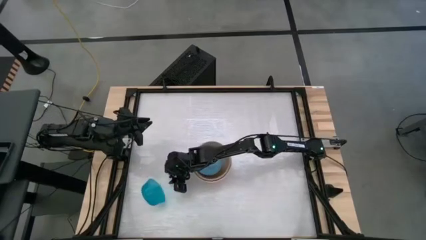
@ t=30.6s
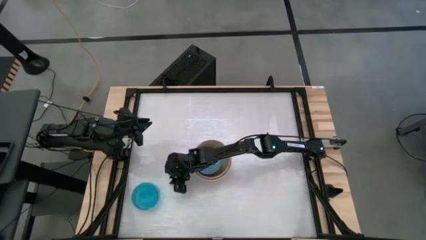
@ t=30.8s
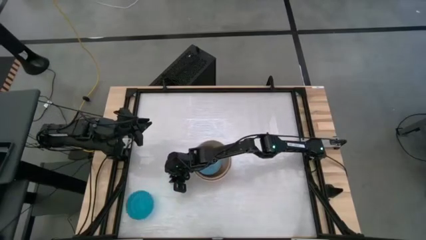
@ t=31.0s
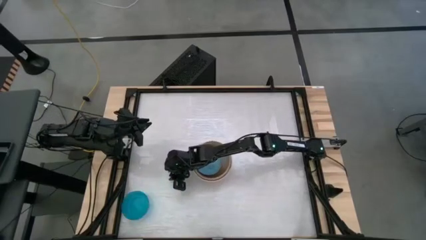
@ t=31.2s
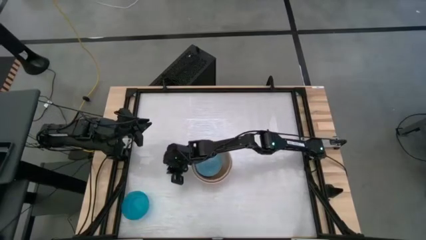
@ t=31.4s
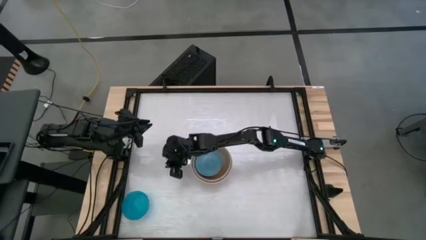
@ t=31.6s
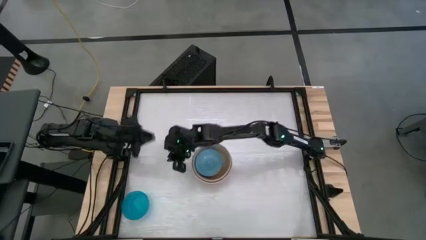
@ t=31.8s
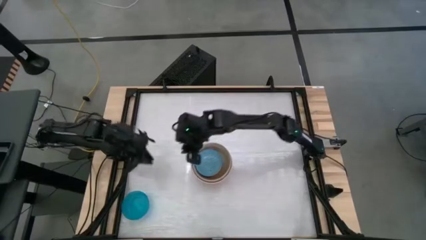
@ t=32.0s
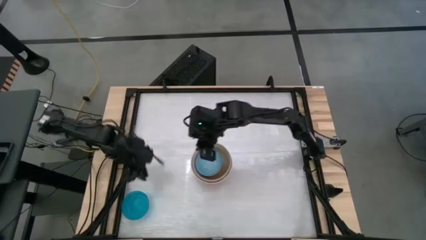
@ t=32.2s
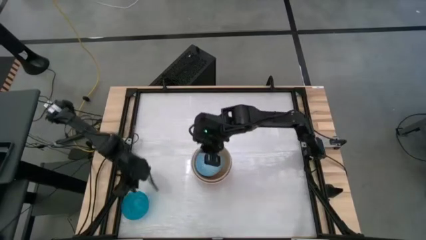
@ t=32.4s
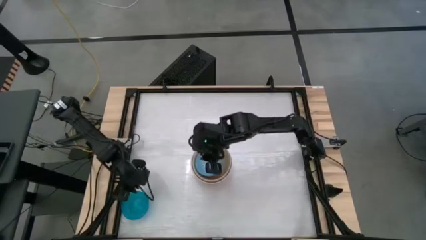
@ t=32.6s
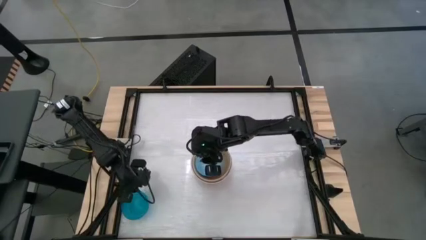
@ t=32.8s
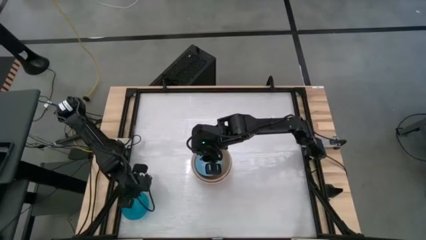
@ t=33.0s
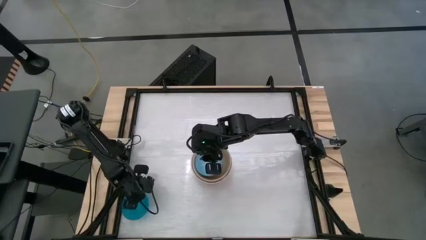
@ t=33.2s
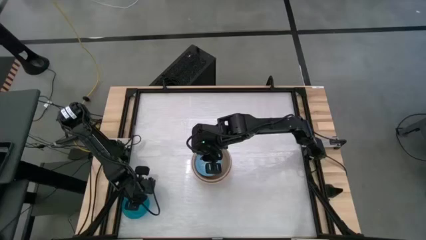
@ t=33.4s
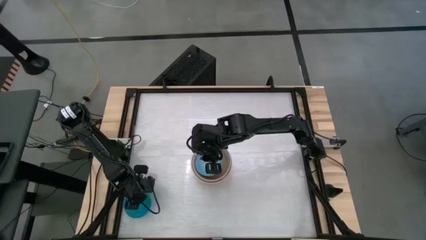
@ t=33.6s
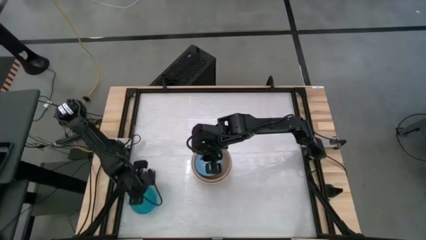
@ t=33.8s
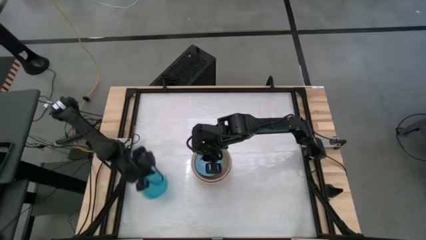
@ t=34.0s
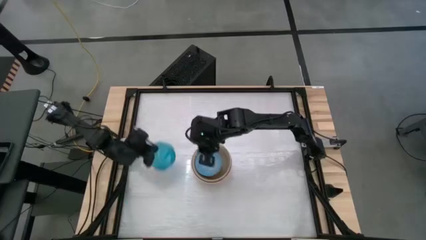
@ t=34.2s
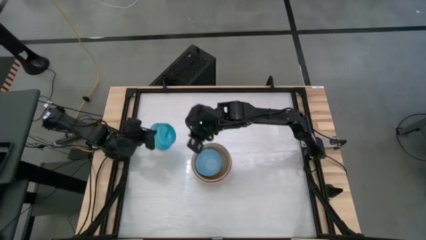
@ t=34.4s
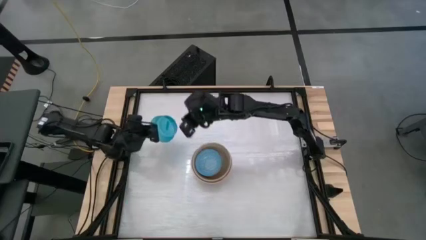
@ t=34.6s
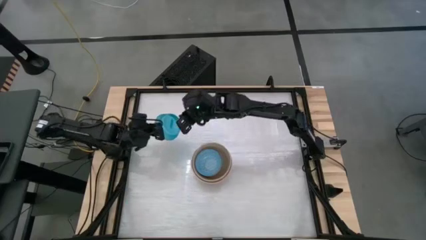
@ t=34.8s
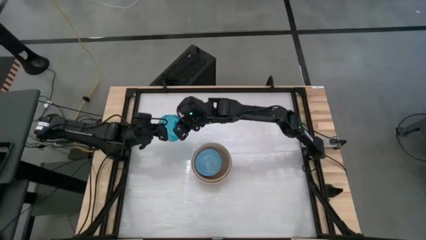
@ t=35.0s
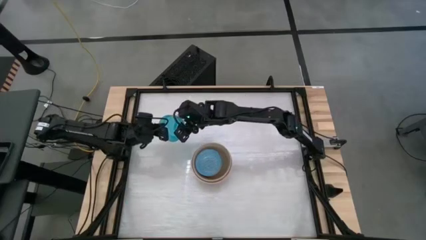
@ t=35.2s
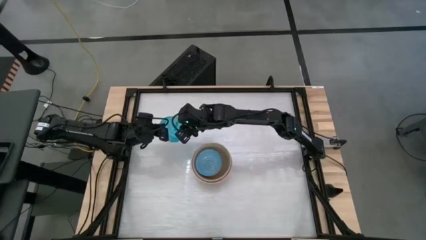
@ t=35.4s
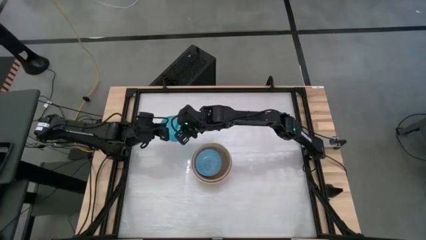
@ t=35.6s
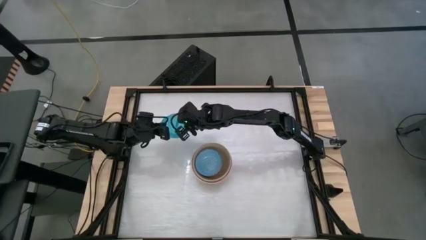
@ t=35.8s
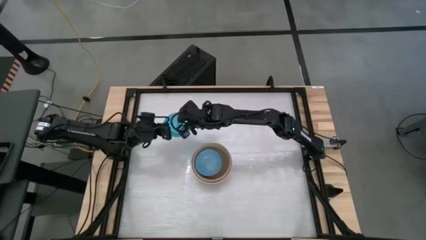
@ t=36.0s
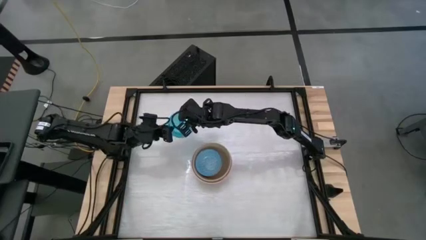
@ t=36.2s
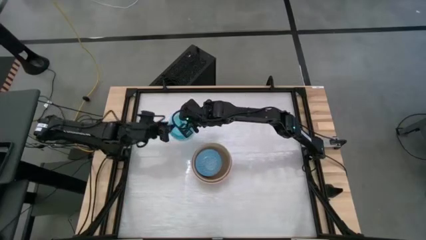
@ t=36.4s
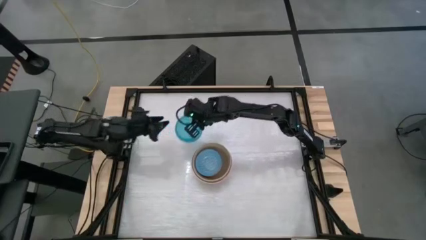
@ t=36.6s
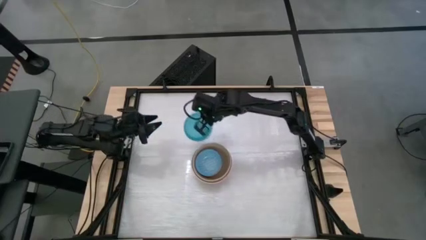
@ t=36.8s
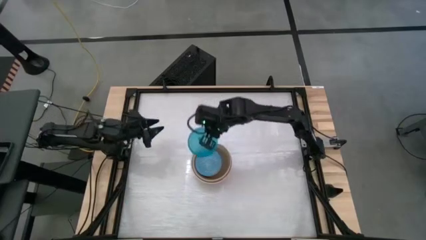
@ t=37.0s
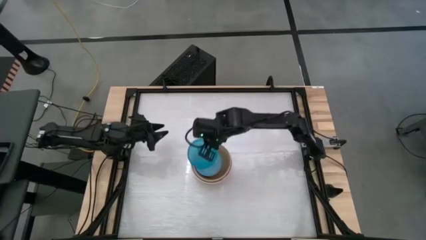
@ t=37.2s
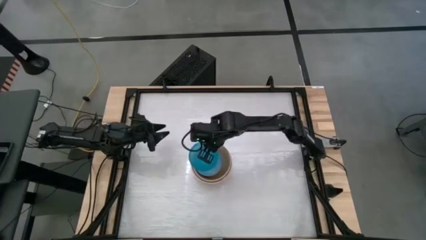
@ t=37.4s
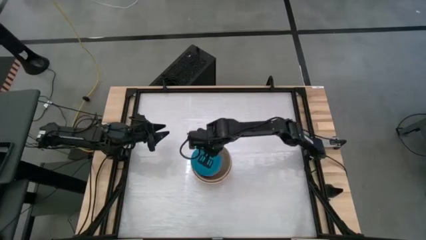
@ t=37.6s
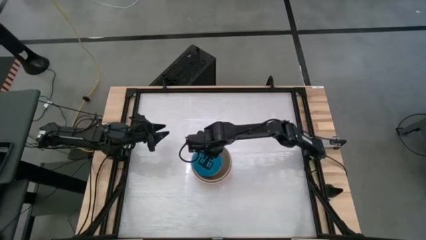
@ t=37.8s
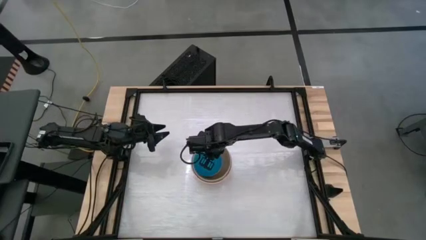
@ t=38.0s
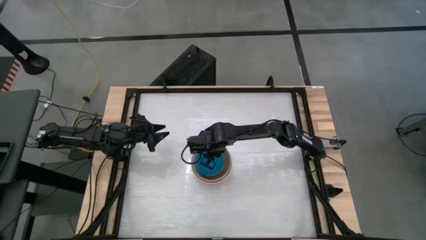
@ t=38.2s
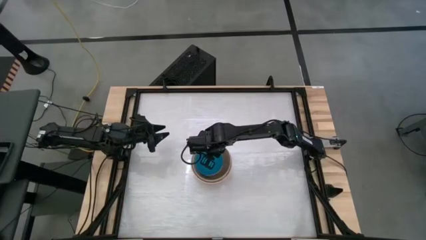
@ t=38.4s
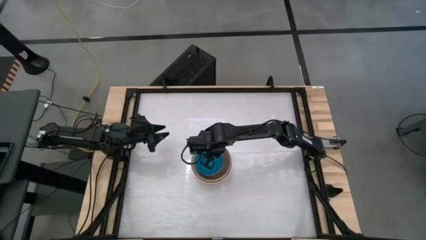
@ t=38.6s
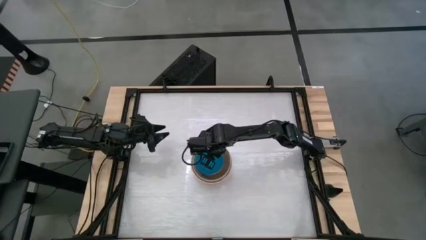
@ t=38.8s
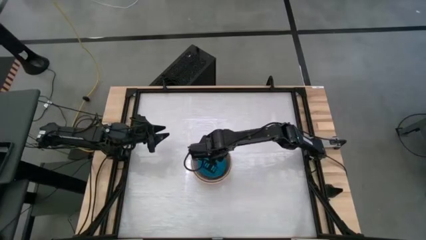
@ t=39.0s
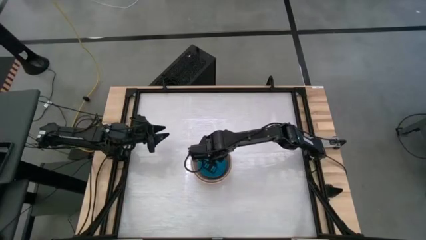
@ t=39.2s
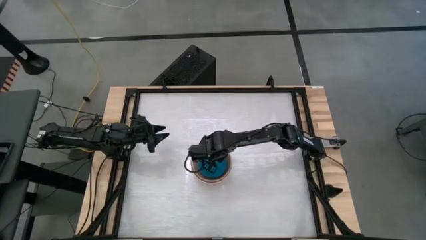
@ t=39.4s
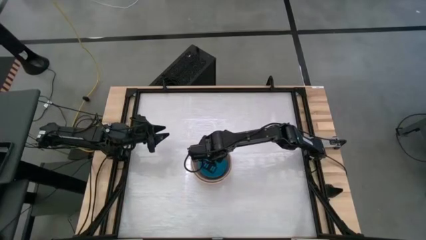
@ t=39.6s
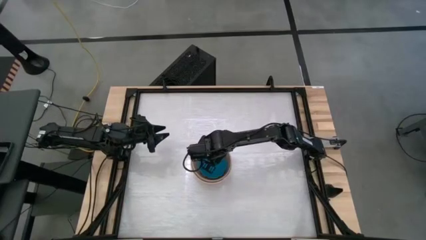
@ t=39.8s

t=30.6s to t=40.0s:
Stack the blue bowl into the blue patterned bowl

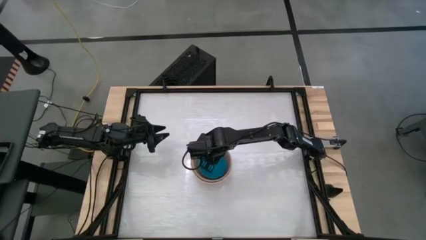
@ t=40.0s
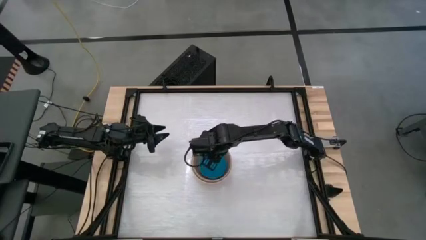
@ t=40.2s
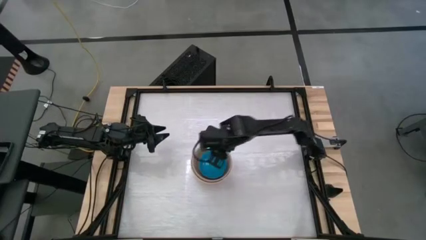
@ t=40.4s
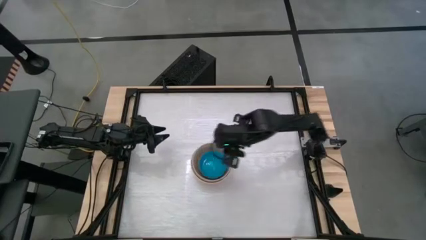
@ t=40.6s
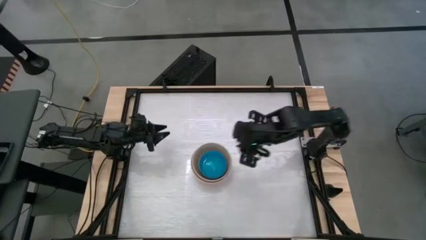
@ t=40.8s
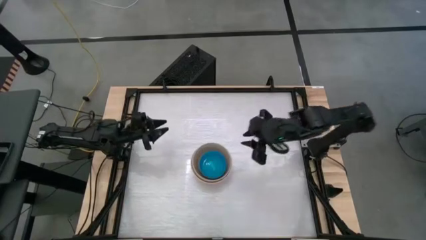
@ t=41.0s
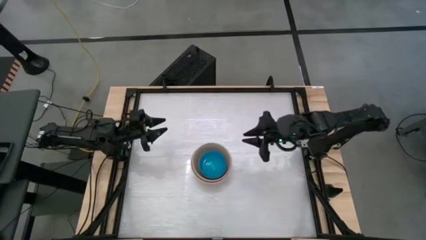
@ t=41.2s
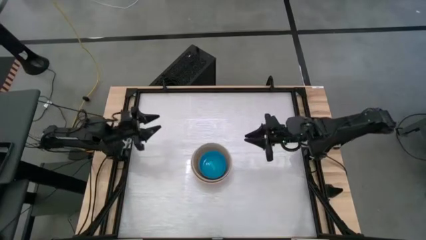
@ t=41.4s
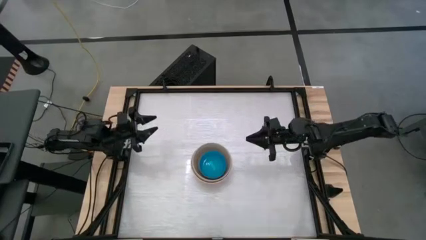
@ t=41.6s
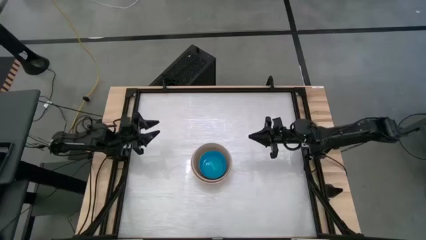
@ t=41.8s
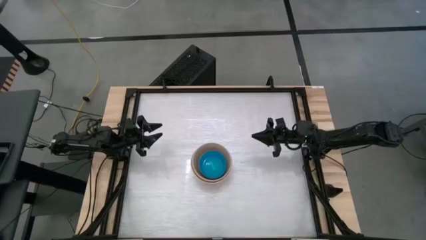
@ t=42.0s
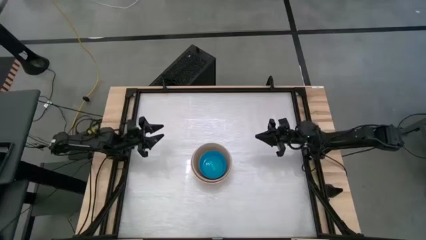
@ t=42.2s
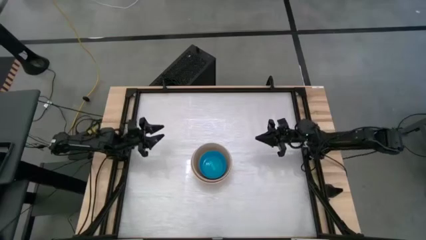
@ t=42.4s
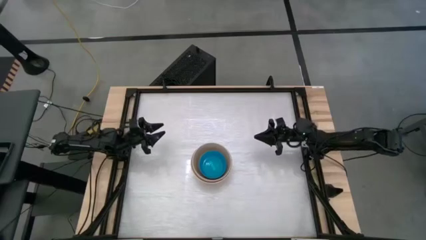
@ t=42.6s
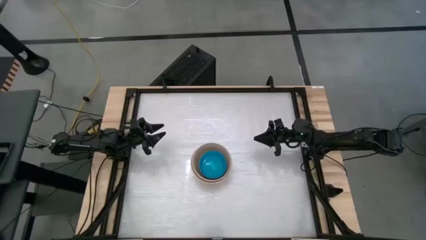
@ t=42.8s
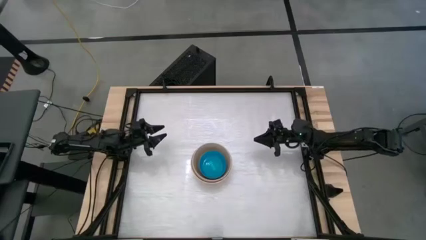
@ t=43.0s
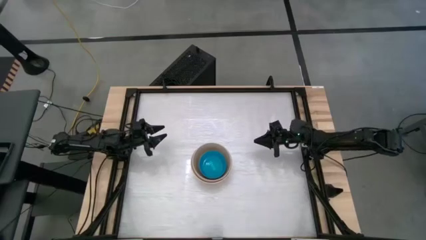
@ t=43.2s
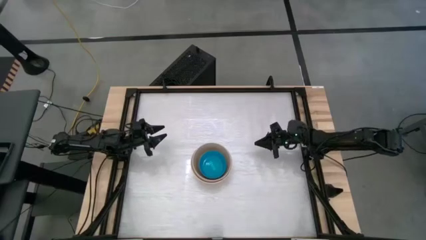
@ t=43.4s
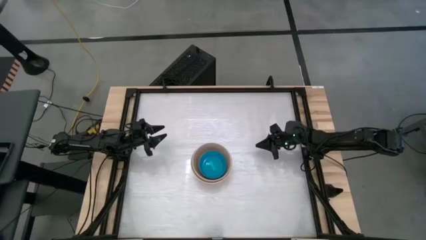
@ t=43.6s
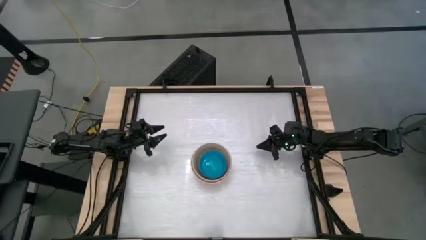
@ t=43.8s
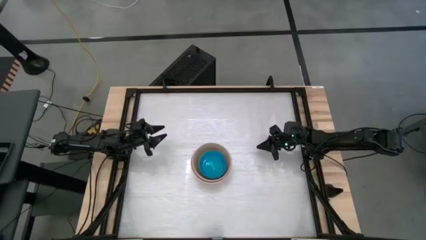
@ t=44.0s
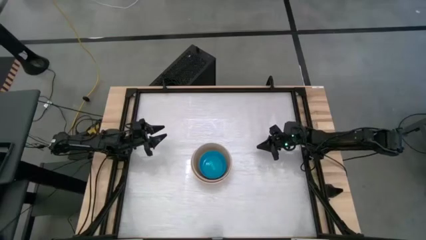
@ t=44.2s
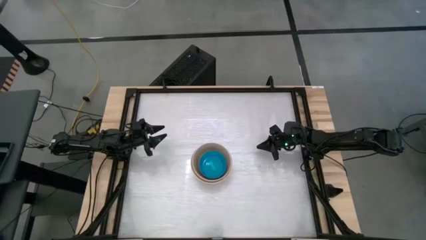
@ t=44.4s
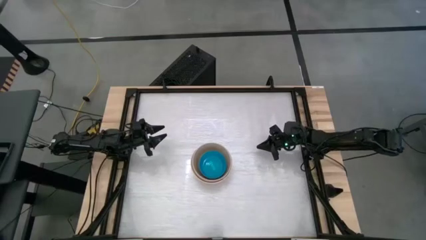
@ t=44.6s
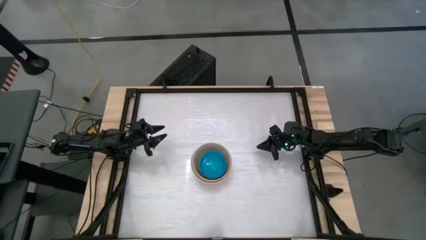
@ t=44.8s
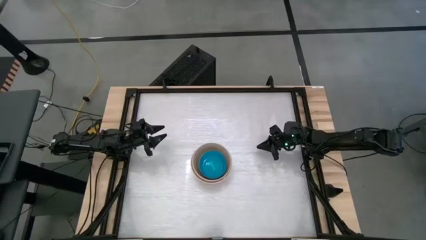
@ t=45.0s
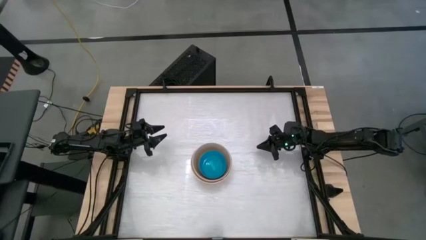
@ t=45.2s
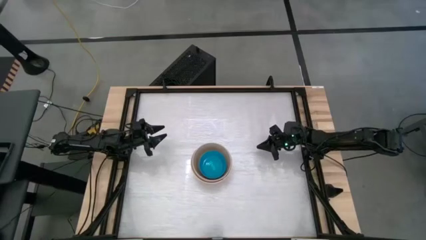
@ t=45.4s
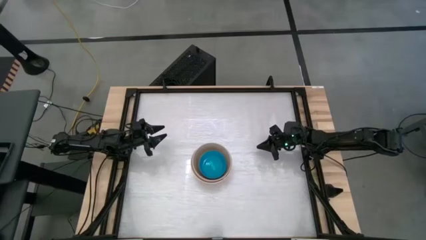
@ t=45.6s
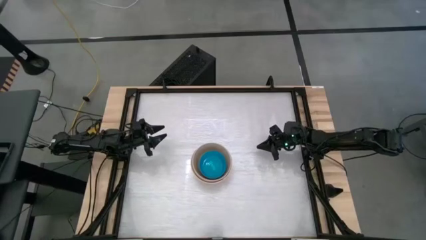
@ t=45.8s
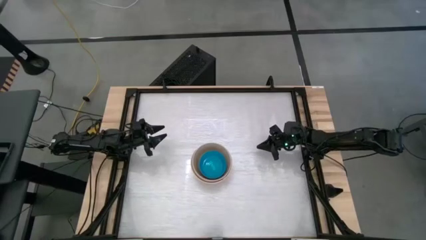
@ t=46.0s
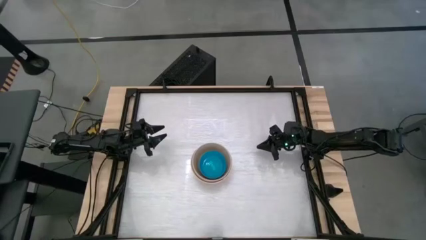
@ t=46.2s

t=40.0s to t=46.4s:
Return to Home Position
